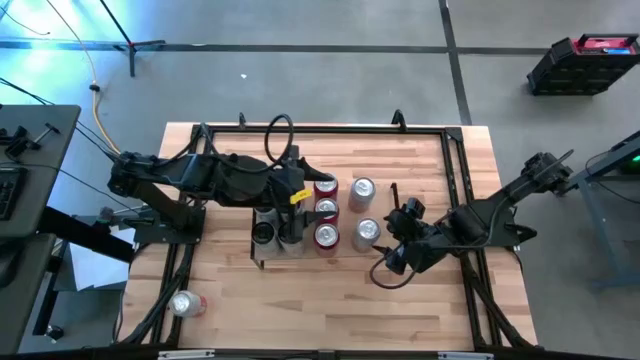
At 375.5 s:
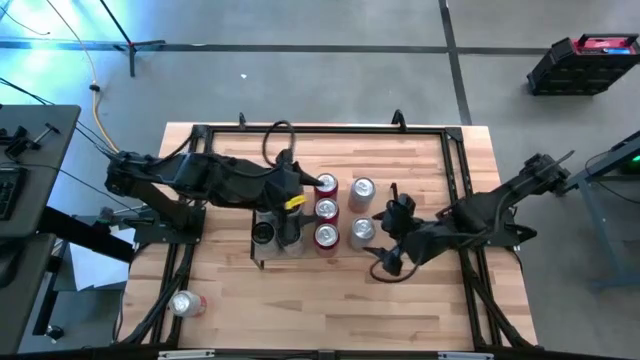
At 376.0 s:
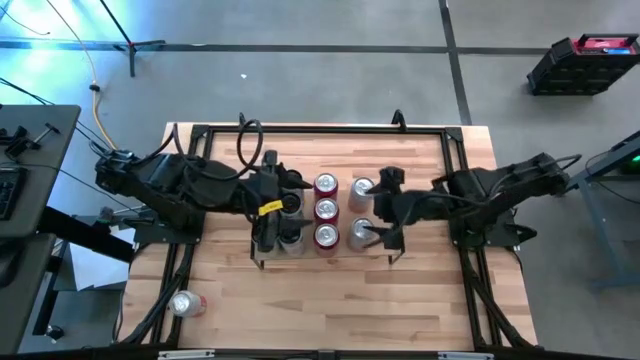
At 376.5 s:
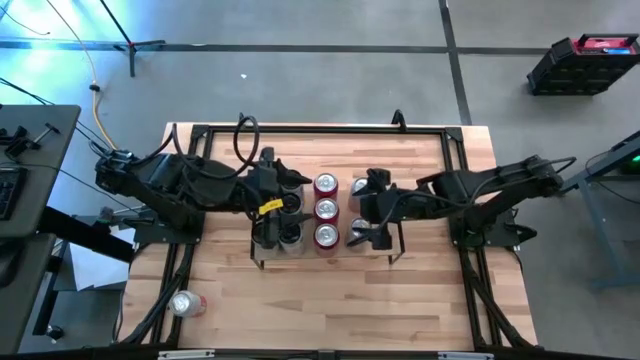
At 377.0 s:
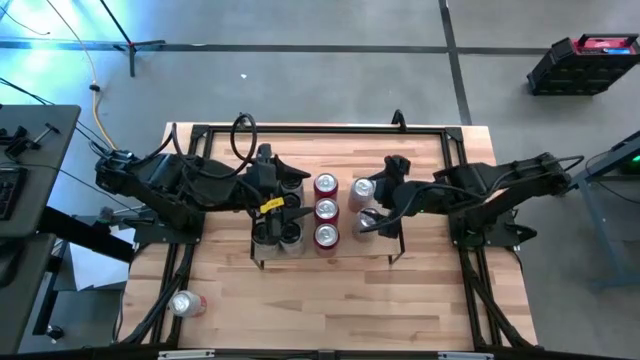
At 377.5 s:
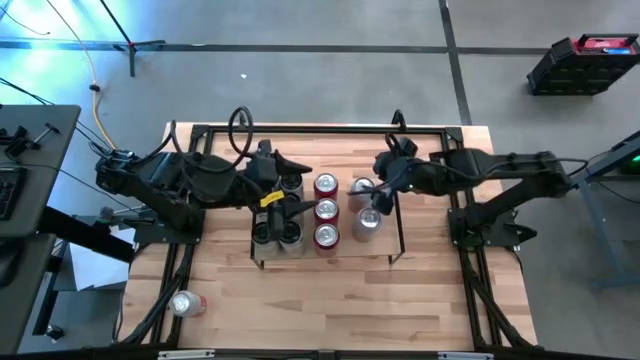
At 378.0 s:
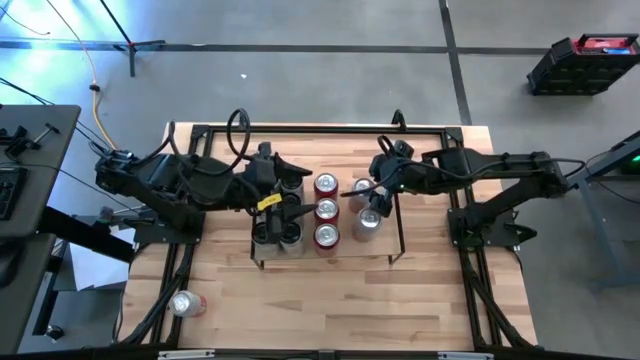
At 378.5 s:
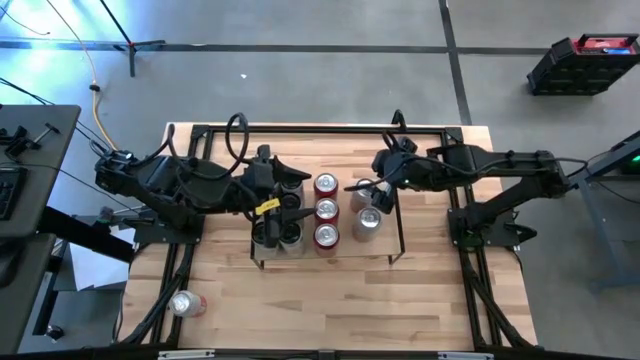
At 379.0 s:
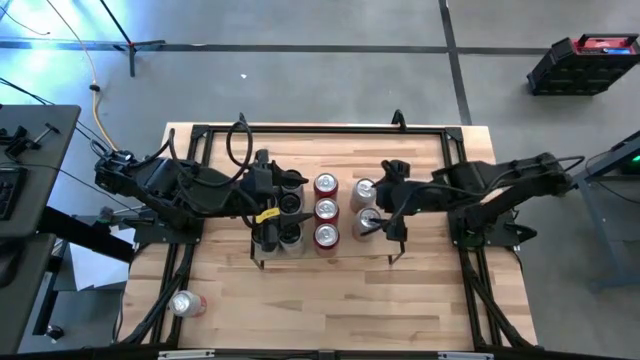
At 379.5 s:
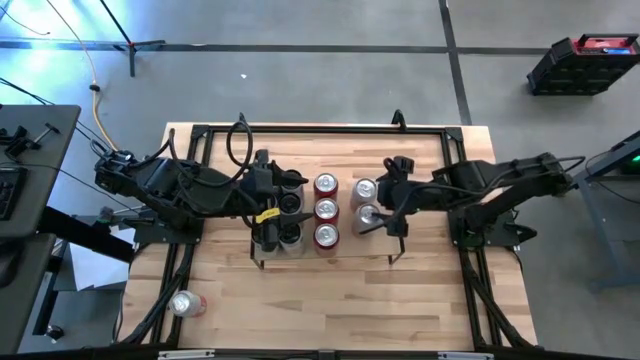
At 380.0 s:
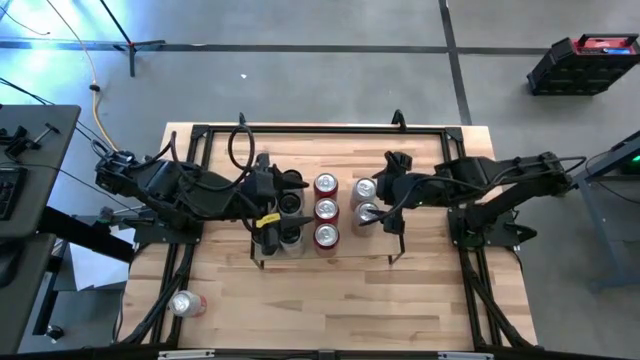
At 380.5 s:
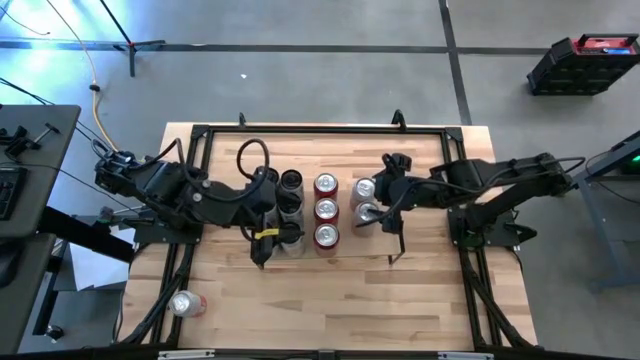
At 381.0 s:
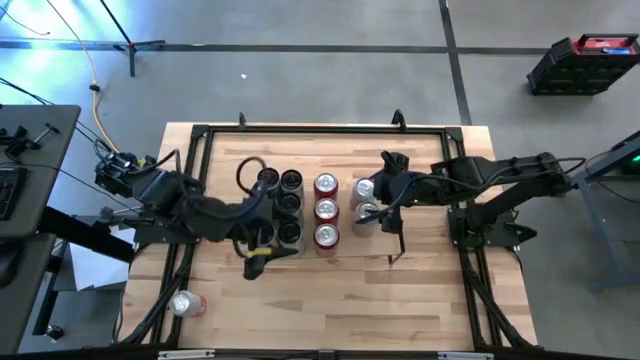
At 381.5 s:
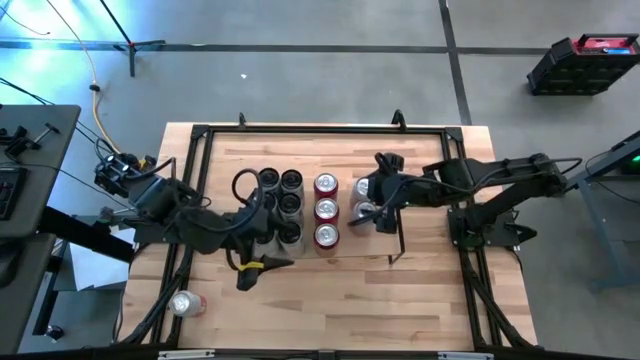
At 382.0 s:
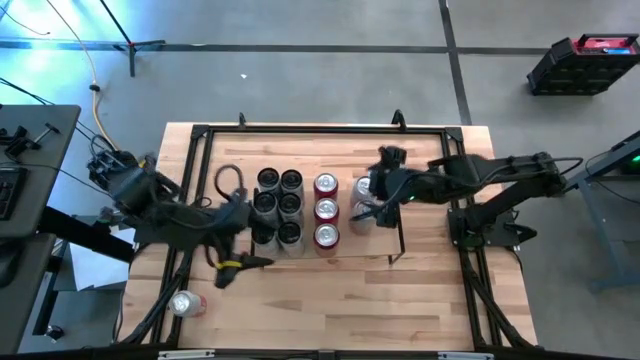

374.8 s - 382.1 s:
Task: Place canned beverage on shelf
Adjust the orange white soda cans on the shelf

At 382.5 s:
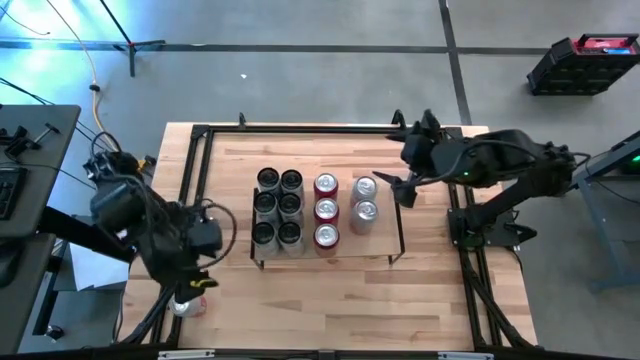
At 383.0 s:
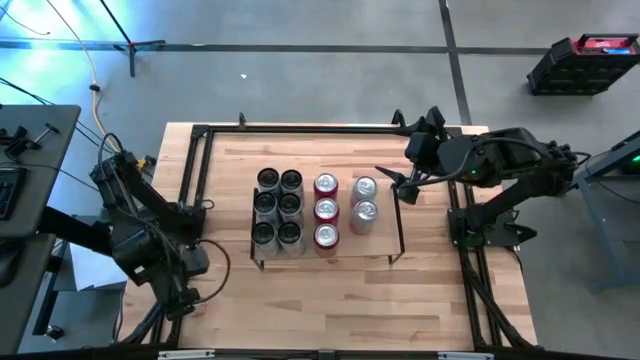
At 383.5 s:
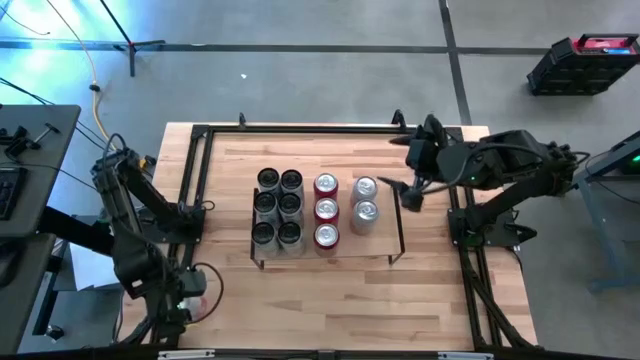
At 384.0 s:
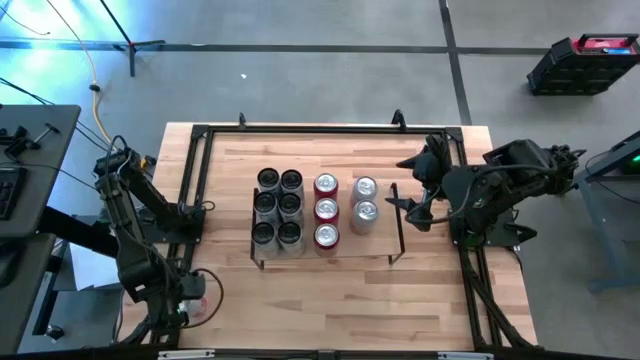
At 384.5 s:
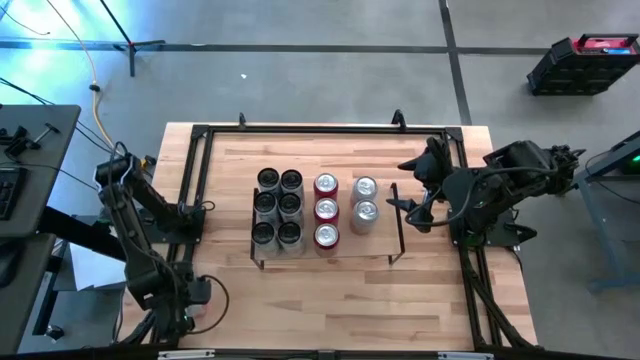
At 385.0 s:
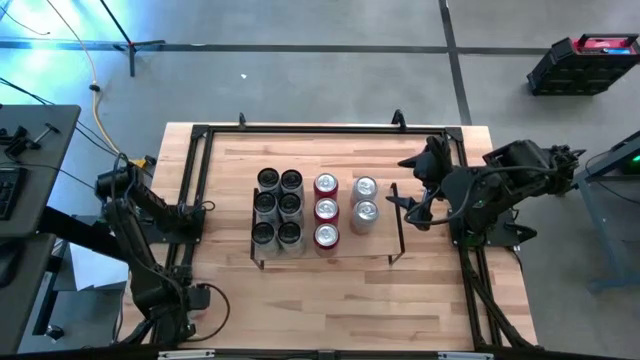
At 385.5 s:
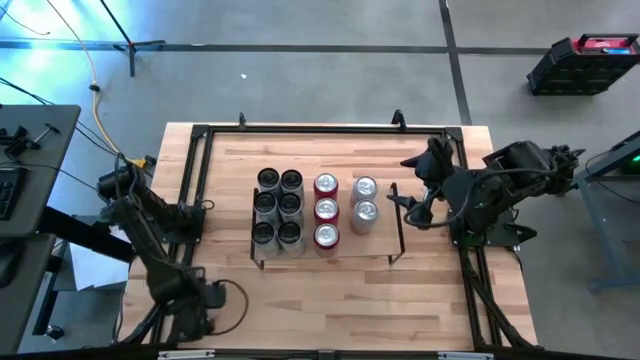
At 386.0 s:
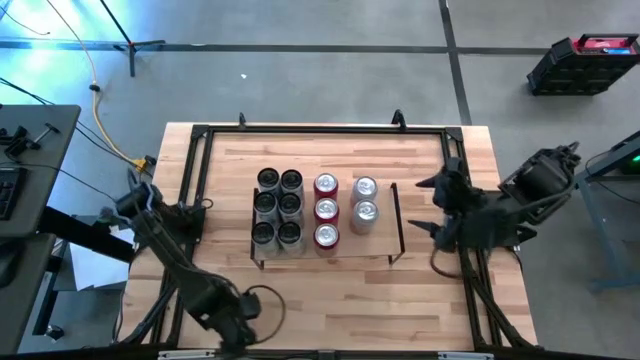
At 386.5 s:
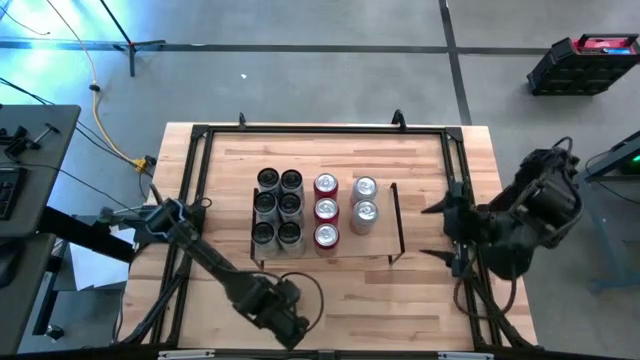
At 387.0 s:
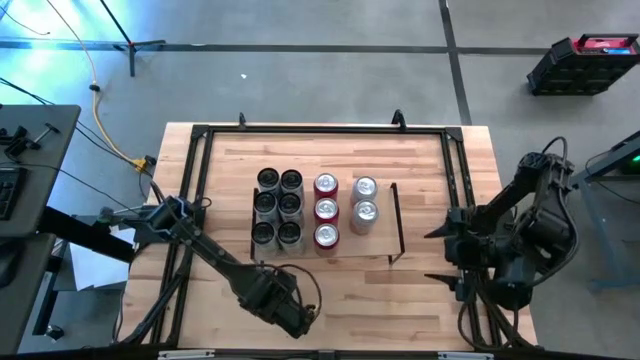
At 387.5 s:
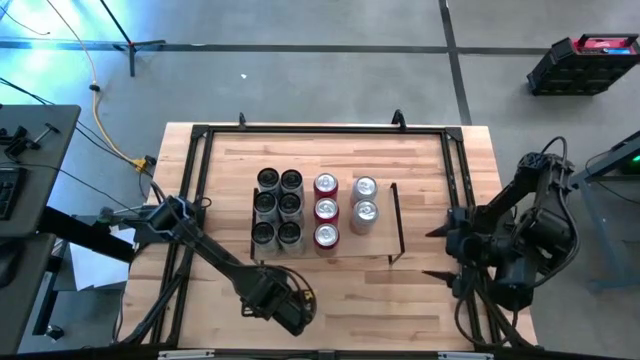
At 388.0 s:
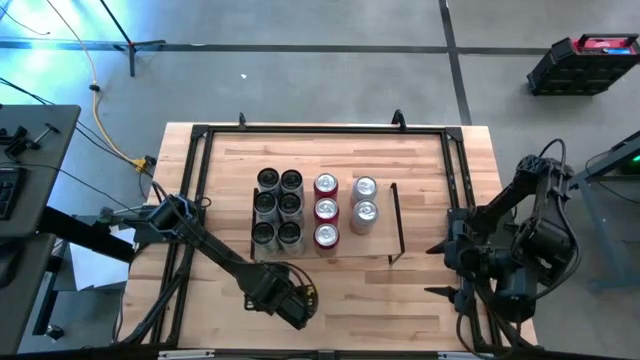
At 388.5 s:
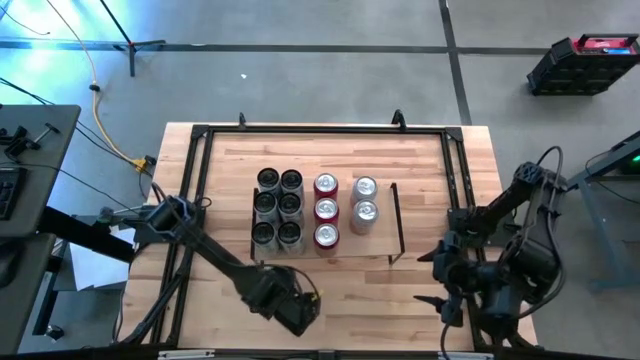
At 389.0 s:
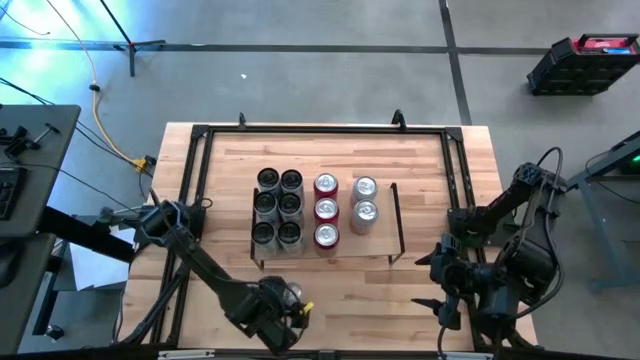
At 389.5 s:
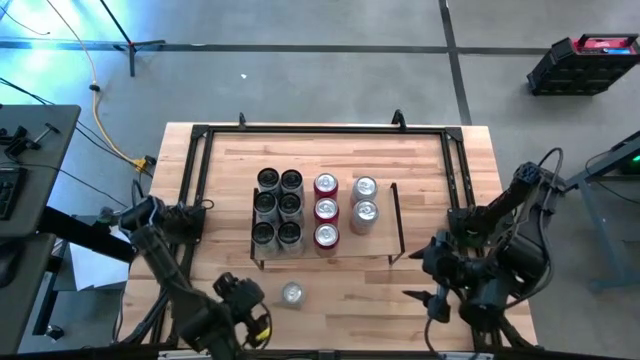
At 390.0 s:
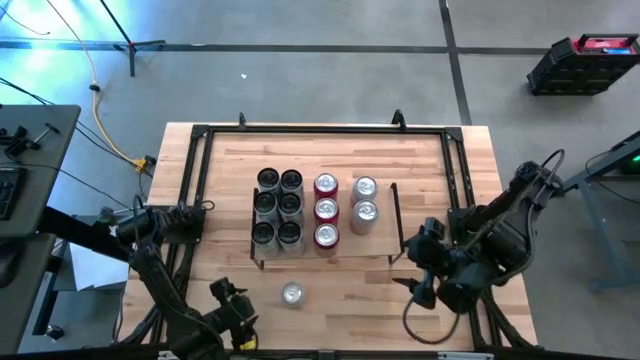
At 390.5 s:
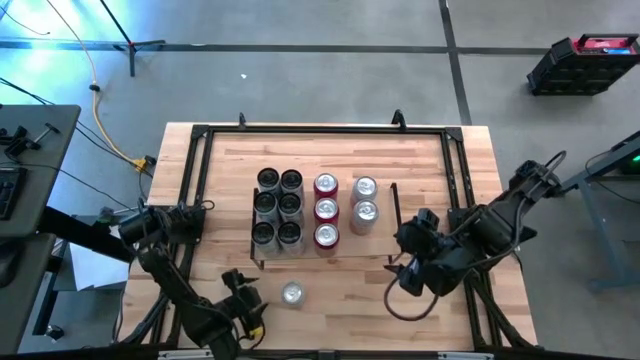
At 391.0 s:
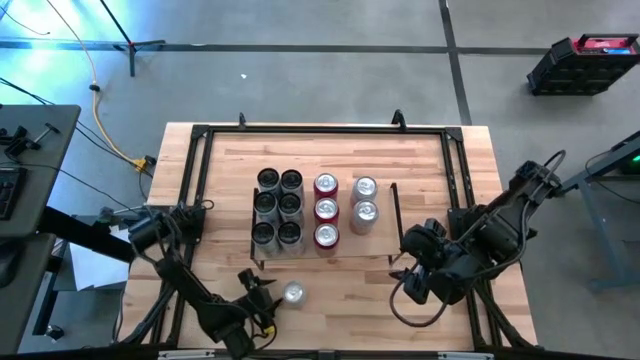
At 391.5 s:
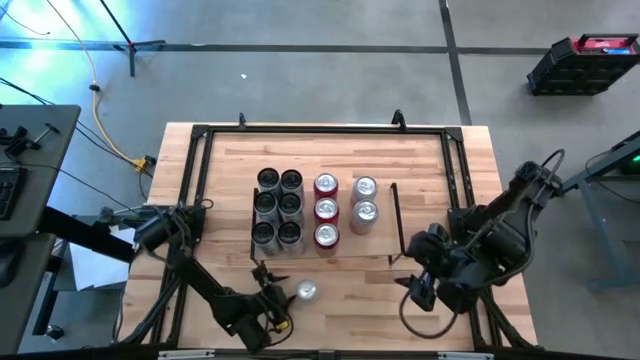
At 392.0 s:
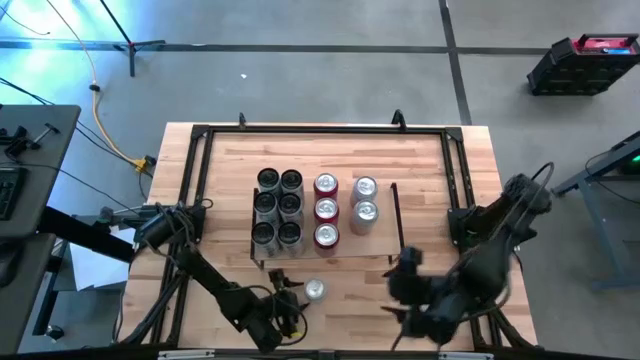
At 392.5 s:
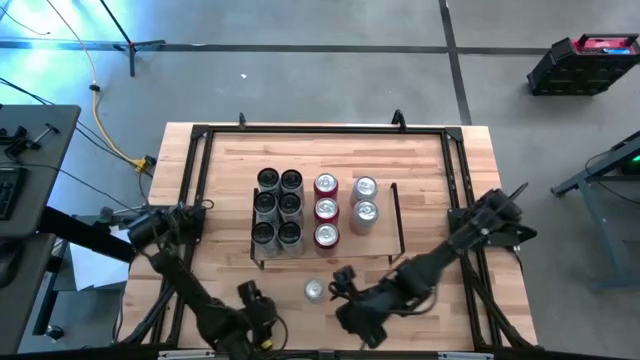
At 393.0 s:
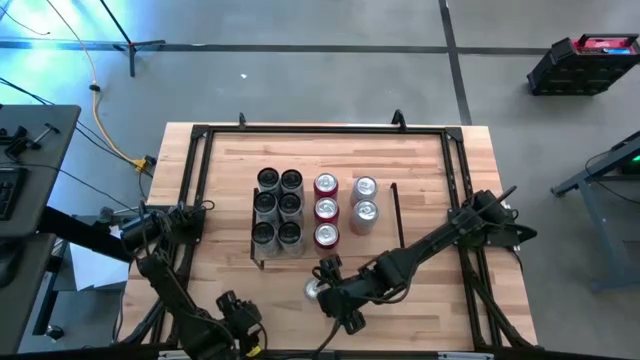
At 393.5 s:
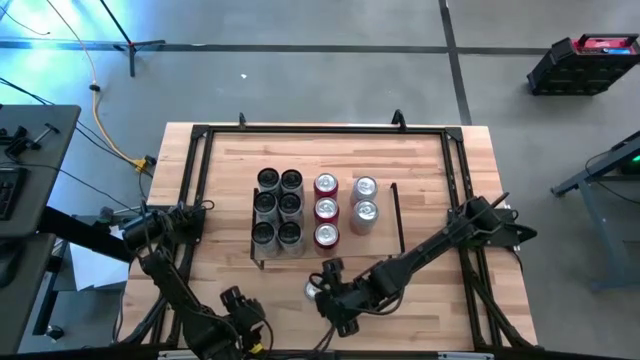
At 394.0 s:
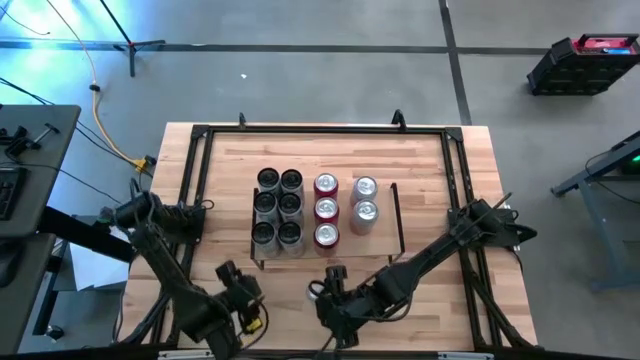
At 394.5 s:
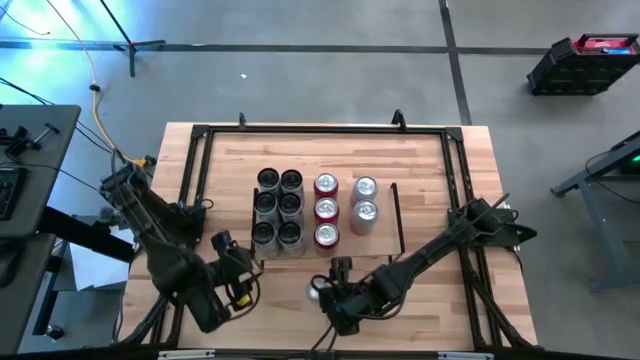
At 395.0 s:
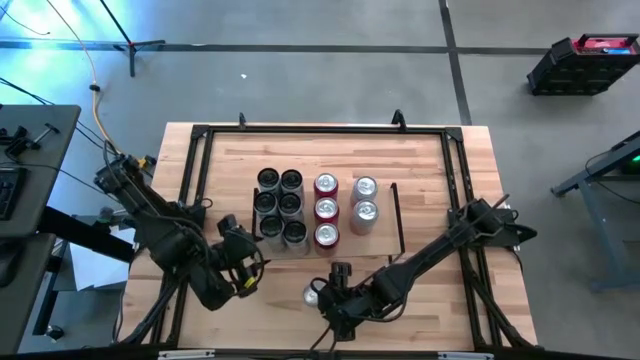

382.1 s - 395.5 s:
Move the pink white soda can to the bottom center of the table

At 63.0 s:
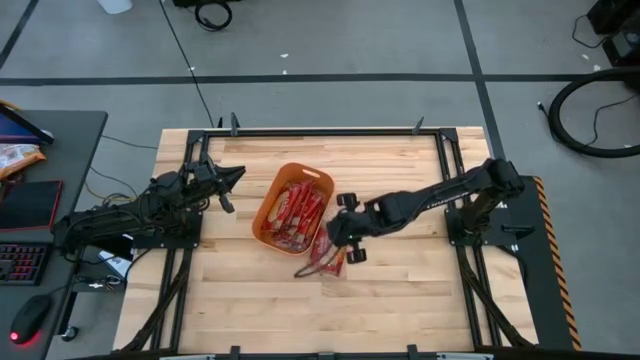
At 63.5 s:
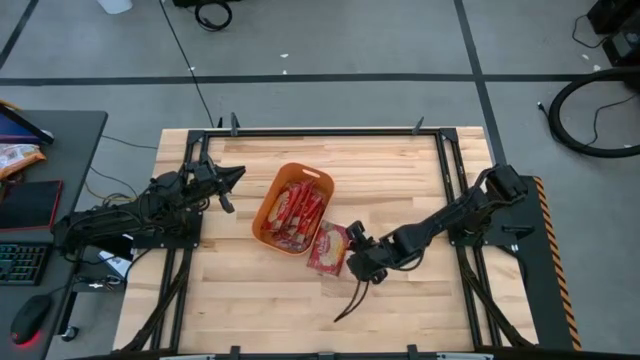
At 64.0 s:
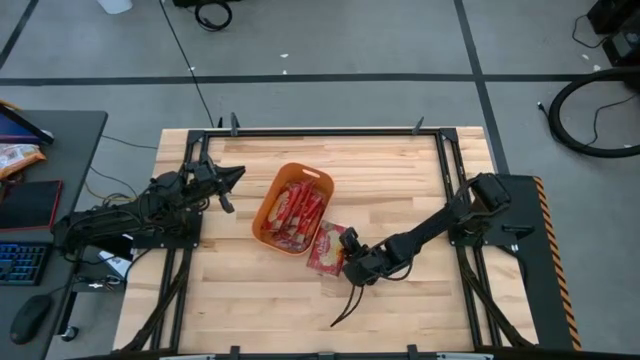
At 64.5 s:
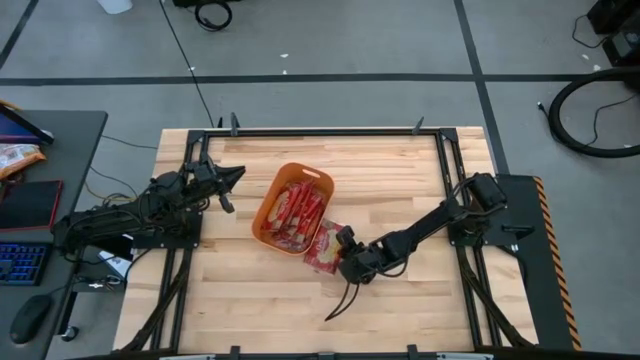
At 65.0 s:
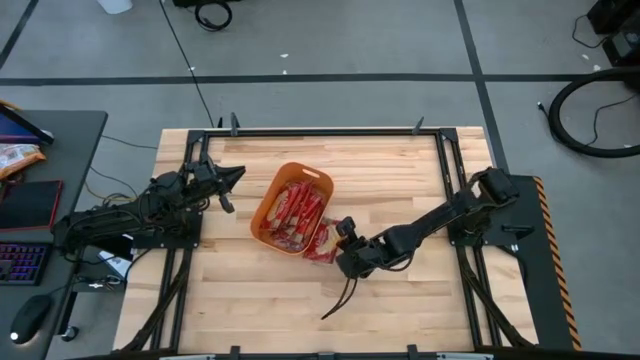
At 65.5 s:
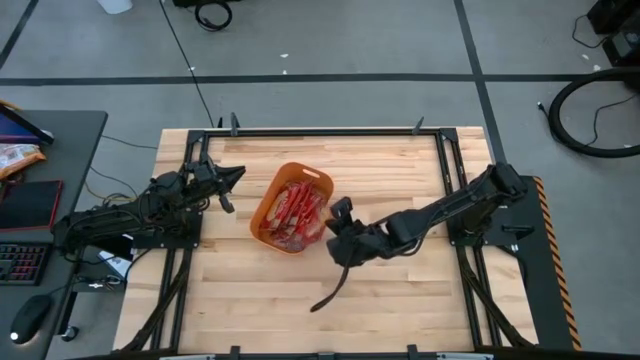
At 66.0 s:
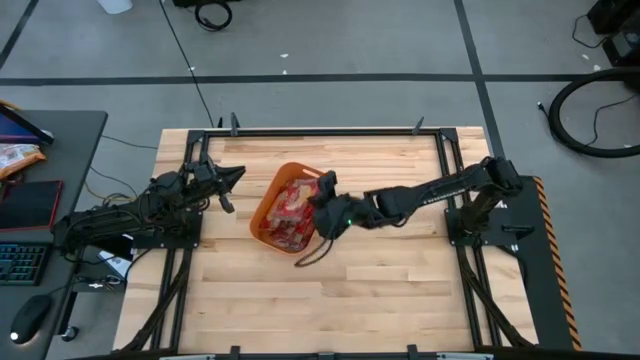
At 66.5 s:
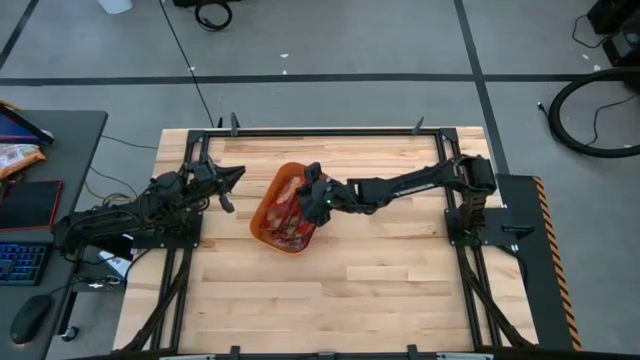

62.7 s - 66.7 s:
Task: Sort popcorn bags into baskets
Put the red popcorn pack into the orange bin
